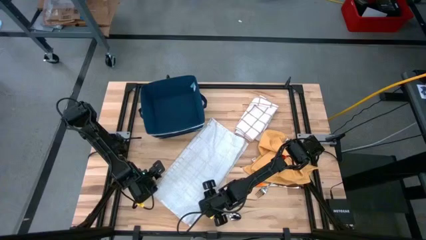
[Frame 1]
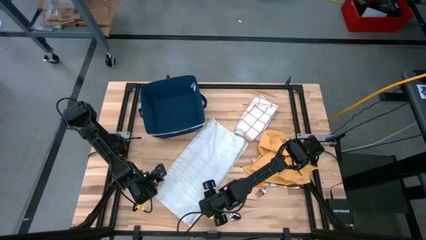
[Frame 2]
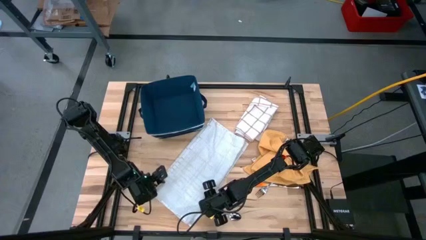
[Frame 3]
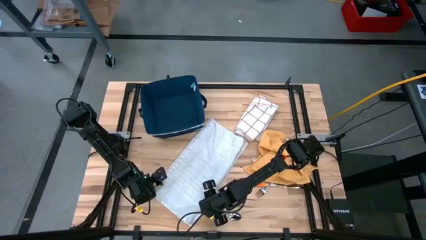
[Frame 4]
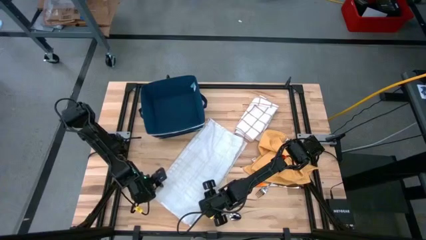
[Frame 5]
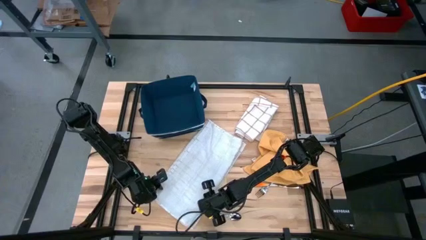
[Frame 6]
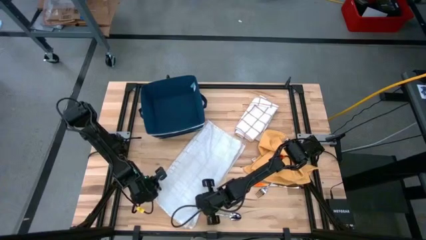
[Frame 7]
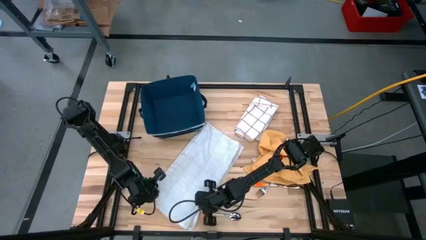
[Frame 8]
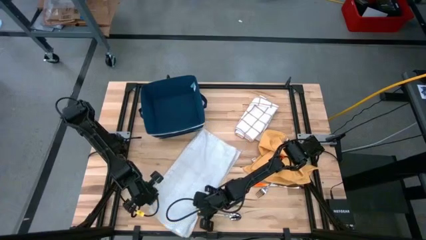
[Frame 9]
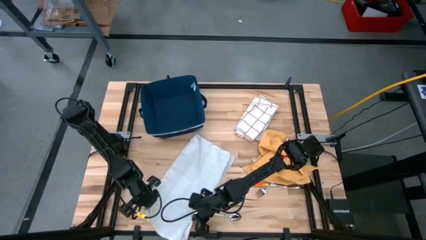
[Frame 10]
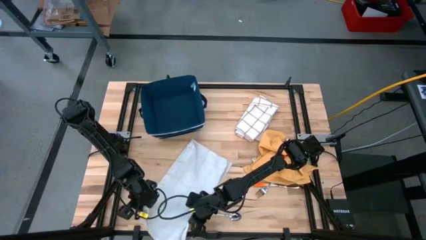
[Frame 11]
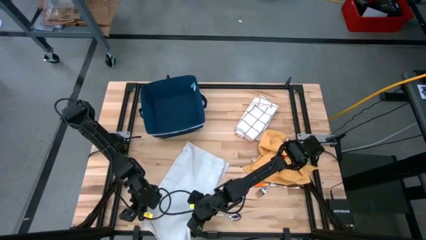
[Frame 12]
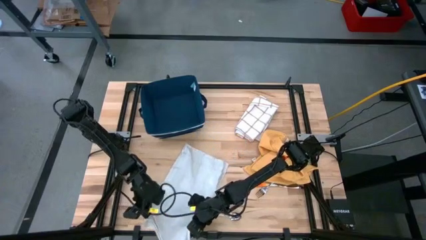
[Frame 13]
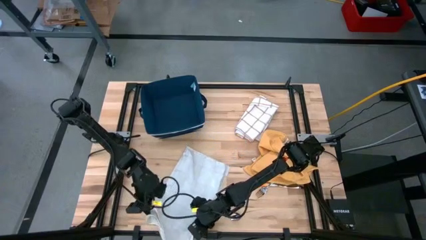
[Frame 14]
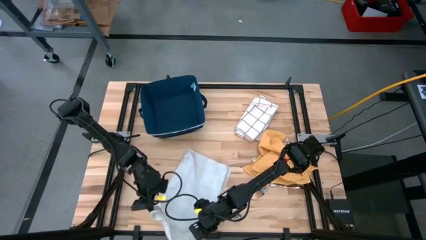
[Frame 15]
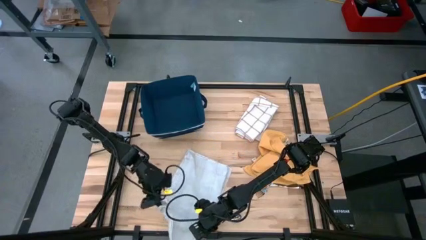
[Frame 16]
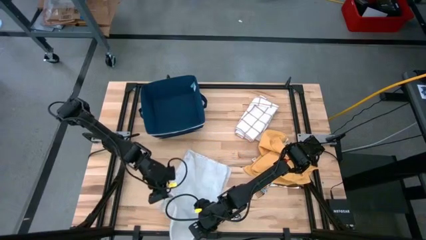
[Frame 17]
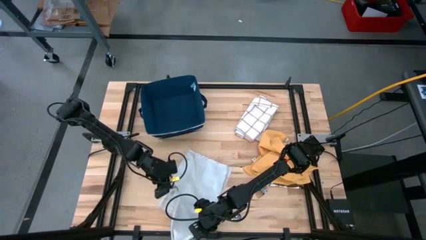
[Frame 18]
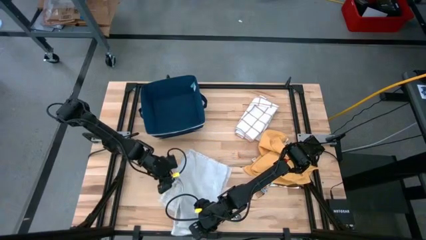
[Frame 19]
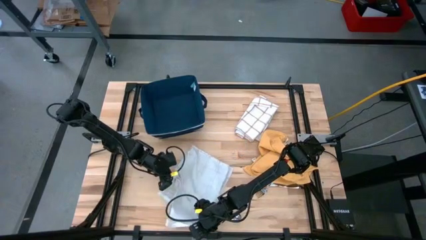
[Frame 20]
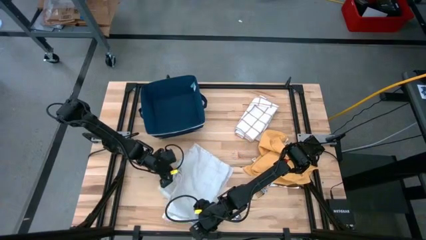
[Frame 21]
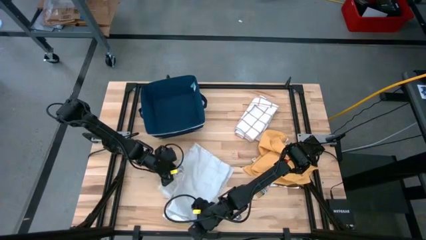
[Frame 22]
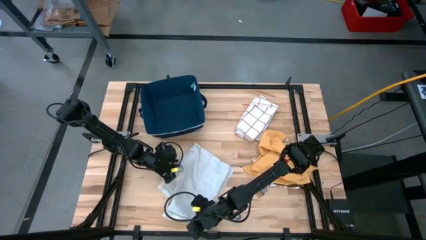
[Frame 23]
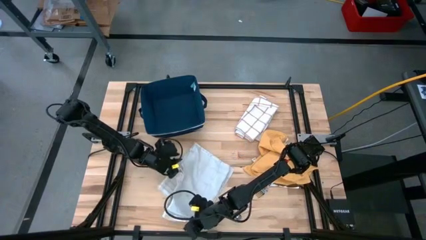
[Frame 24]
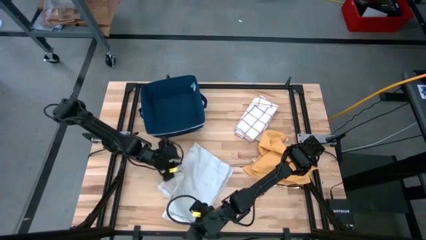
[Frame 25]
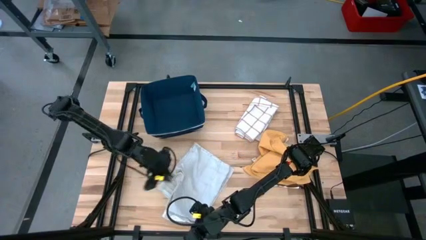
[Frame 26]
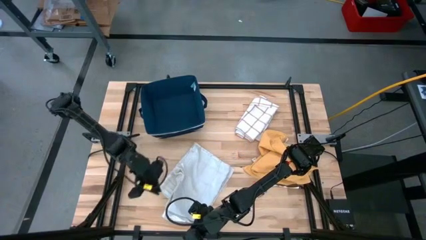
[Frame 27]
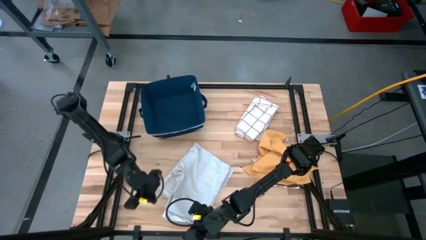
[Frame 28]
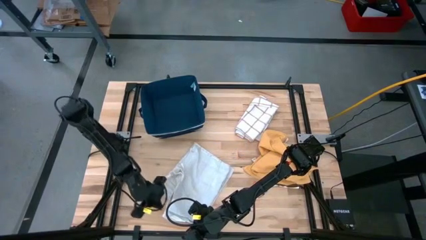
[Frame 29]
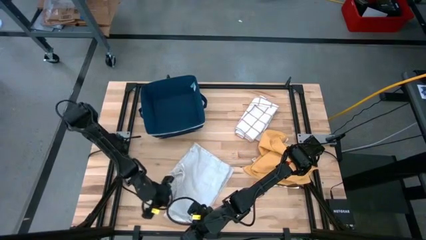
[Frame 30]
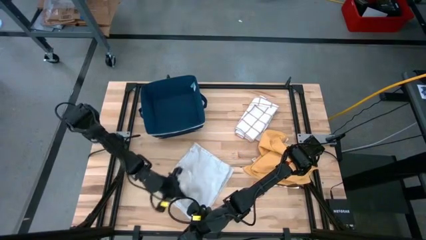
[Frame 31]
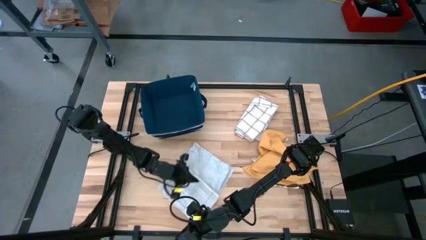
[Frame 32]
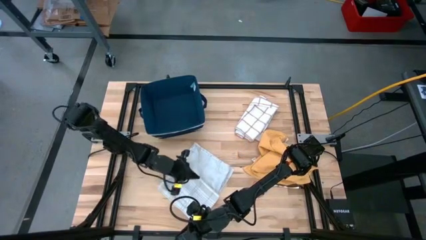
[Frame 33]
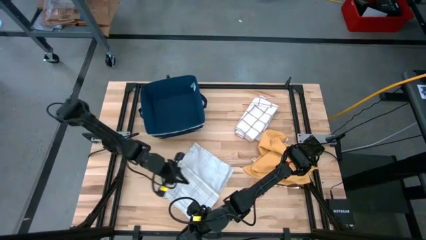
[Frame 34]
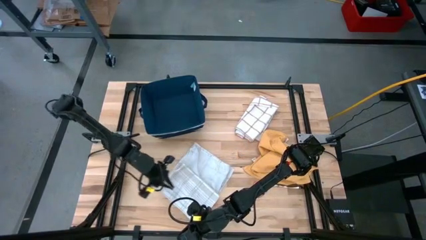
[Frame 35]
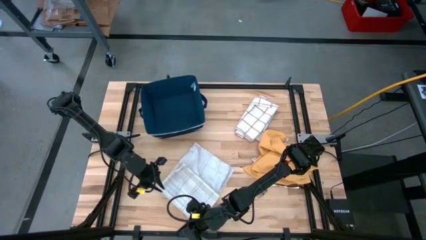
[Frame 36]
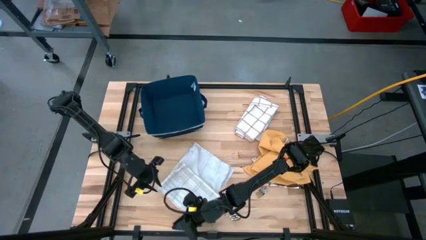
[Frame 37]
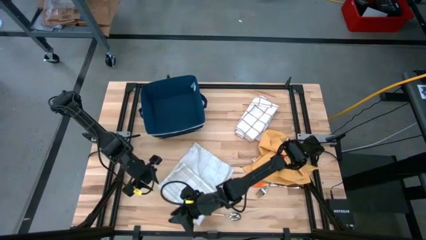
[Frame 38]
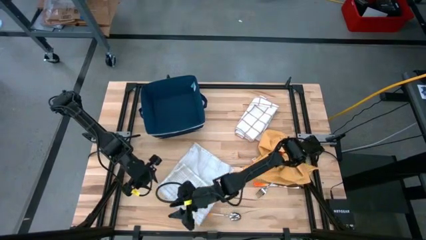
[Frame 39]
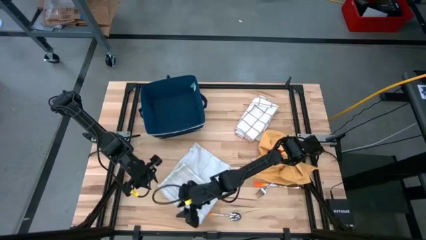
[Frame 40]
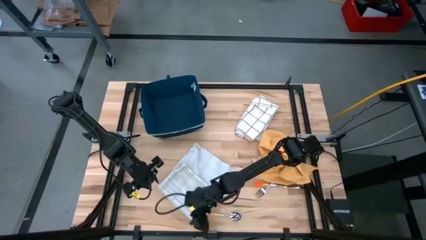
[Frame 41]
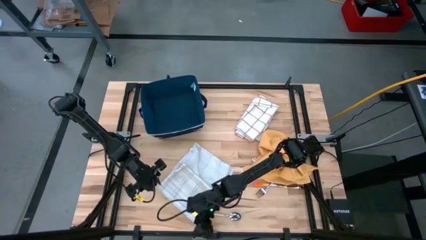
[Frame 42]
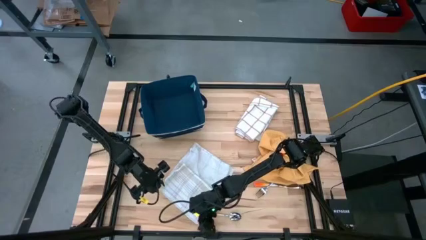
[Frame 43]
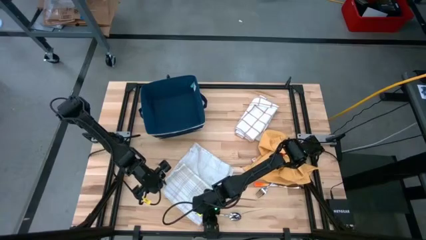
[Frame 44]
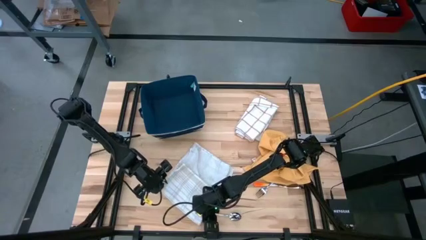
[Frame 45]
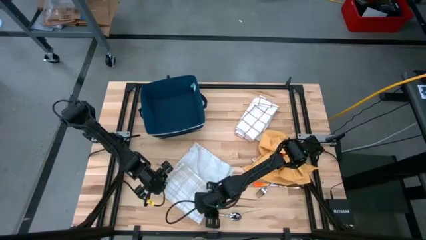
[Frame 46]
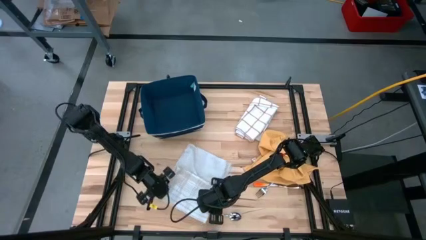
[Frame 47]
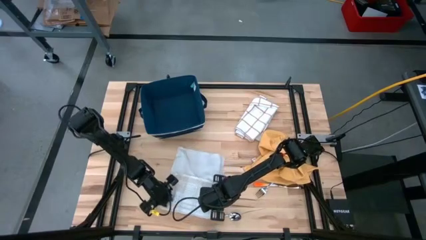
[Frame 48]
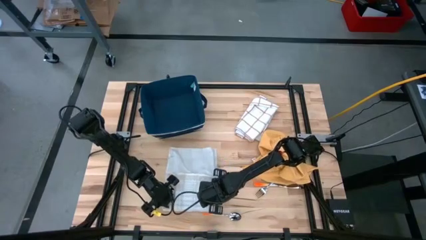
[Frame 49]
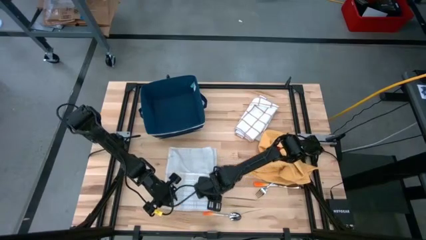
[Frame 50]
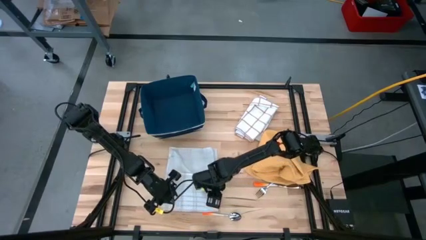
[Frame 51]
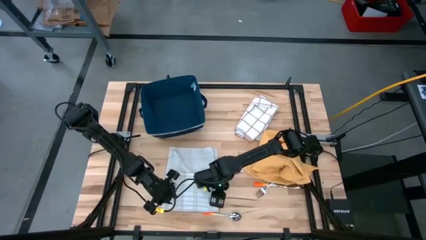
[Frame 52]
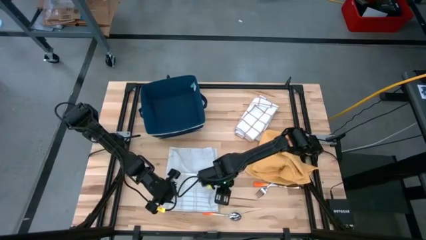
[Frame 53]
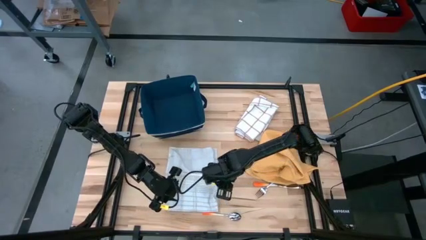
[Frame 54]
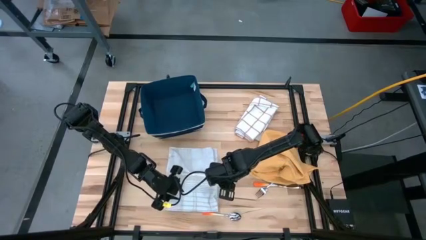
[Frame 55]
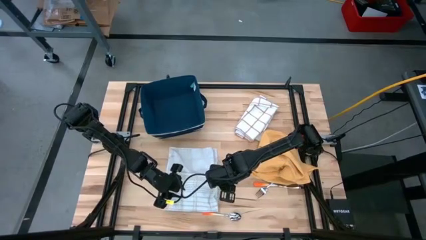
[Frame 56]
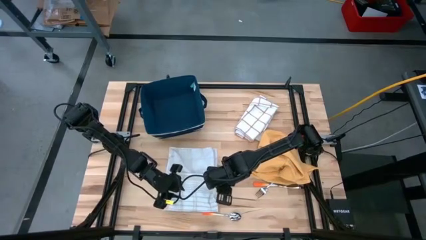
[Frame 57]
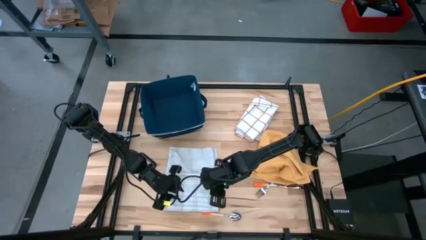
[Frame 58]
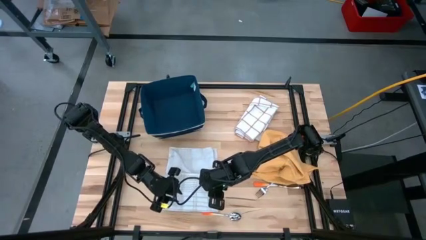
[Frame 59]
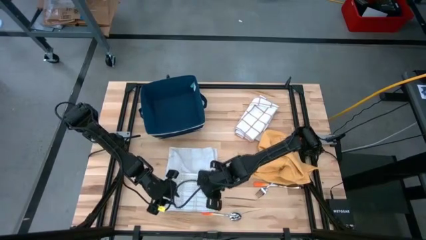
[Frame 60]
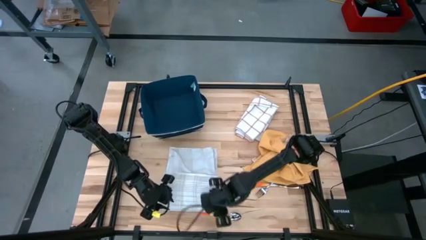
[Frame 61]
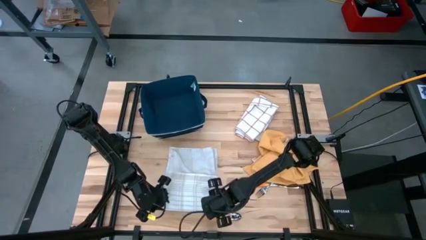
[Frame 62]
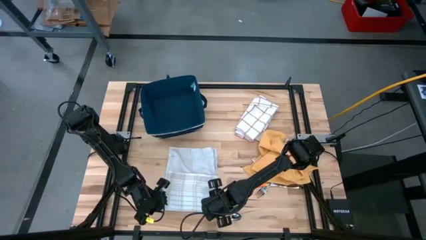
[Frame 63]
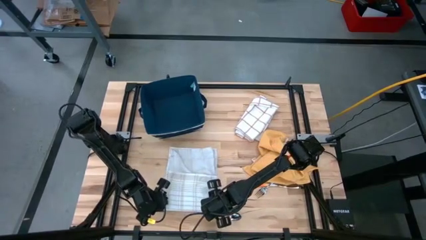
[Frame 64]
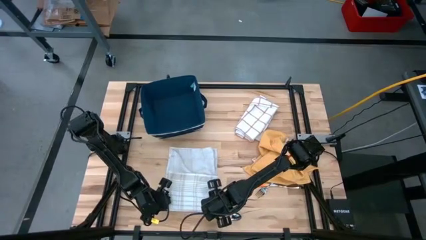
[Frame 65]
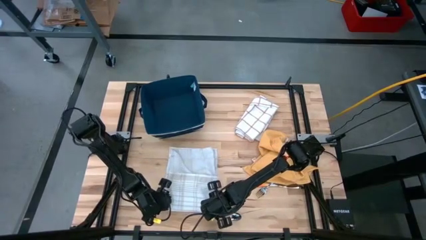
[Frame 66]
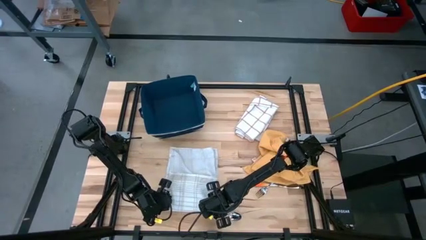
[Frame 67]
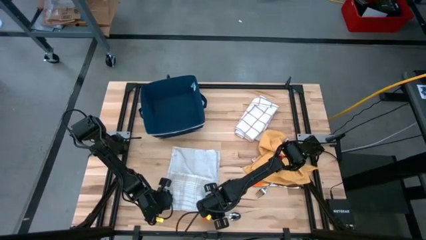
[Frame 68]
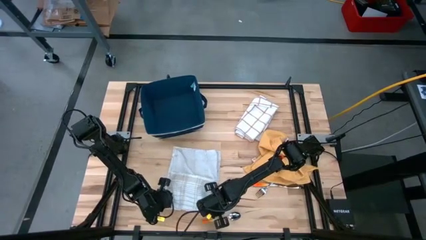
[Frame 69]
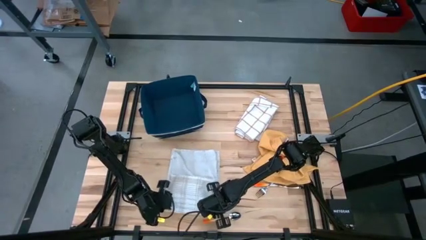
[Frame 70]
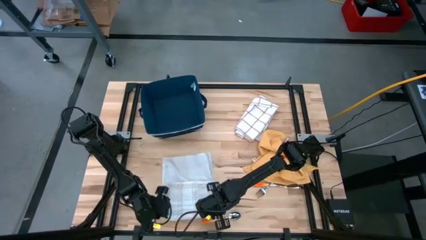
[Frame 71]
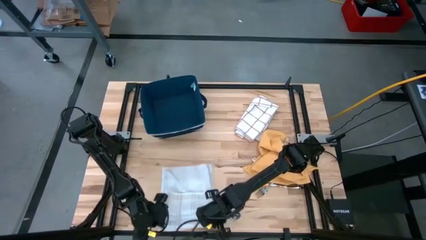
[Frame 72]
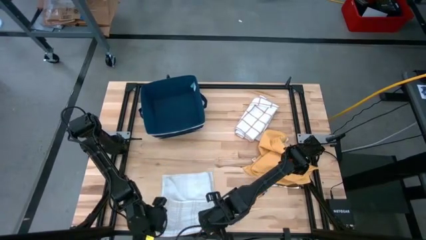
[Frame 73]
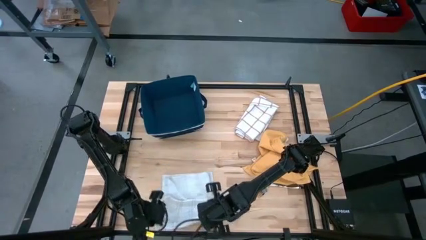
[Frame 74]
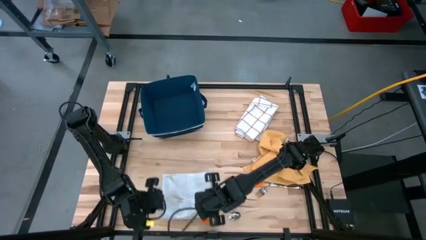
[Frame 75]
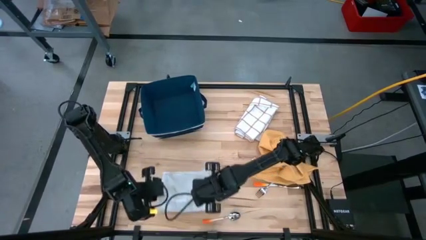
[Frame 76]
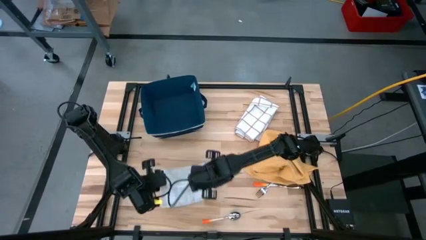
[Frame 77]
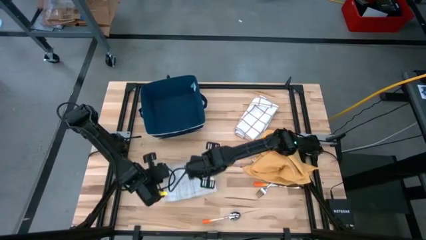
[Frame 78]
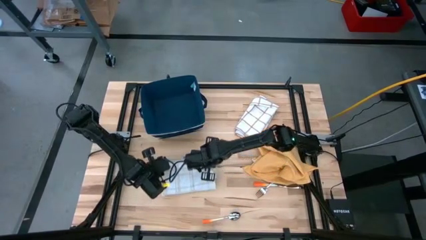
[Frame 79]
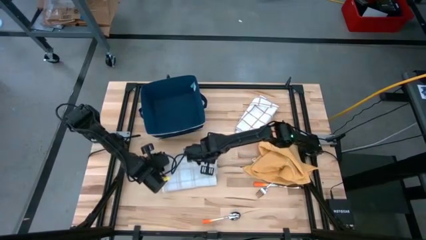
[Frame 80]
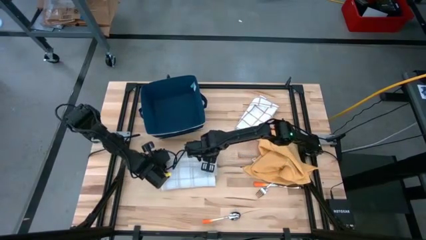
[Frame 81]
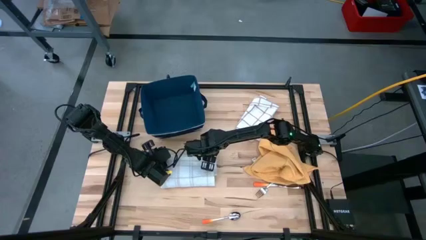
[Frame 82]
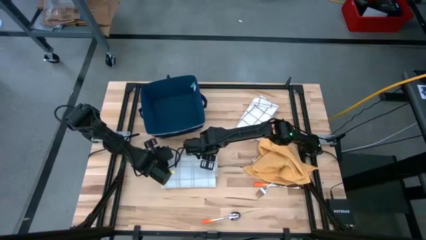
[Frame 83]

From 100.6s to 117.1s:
Task: Fold towel
Fold the left white patterned towel
